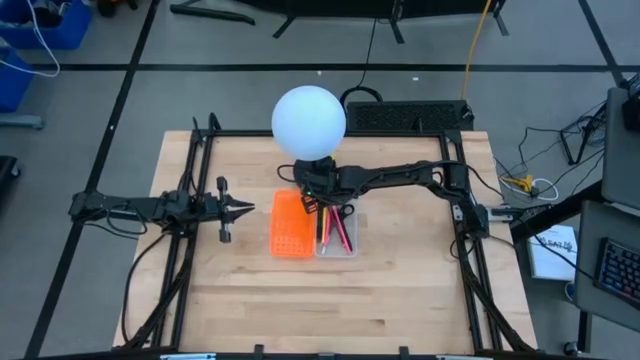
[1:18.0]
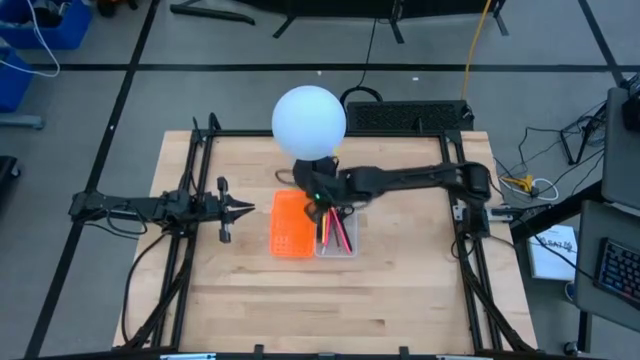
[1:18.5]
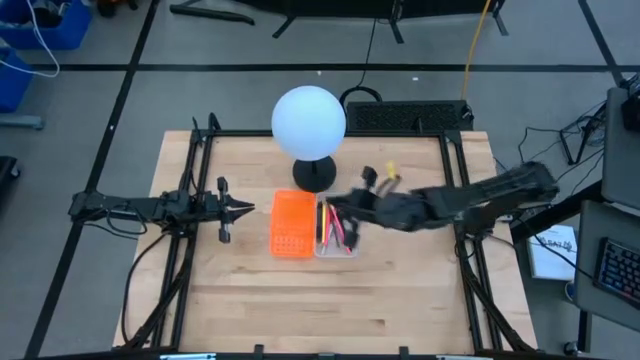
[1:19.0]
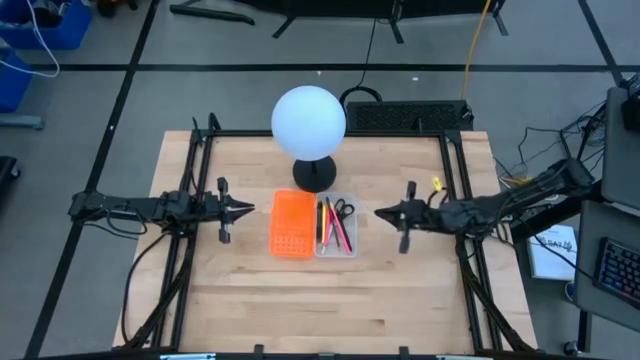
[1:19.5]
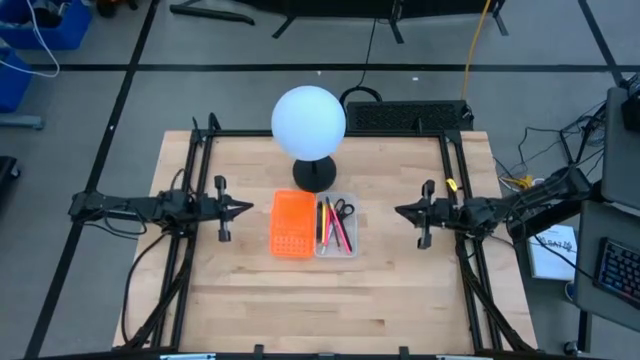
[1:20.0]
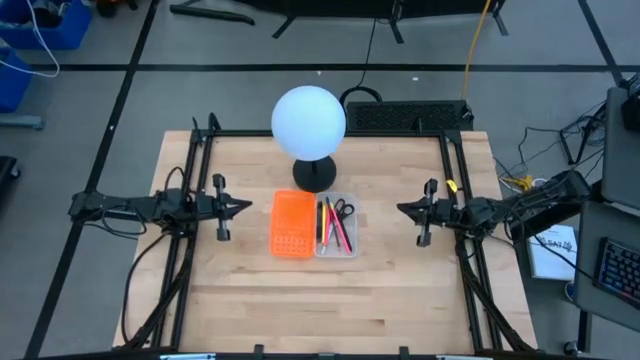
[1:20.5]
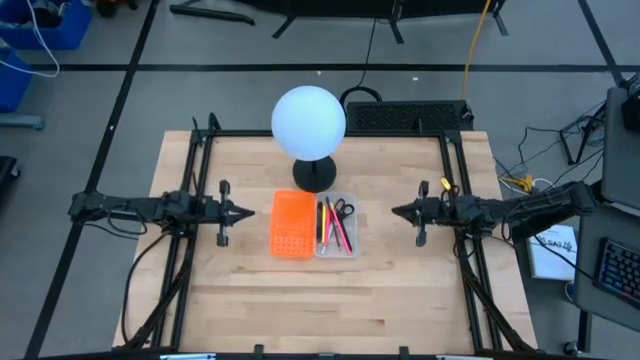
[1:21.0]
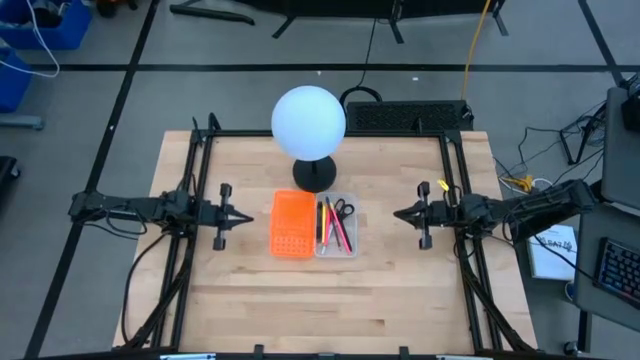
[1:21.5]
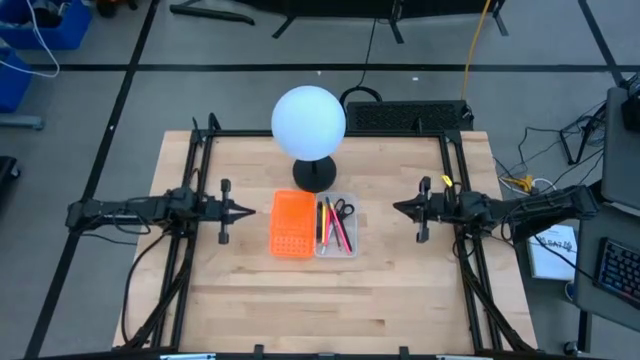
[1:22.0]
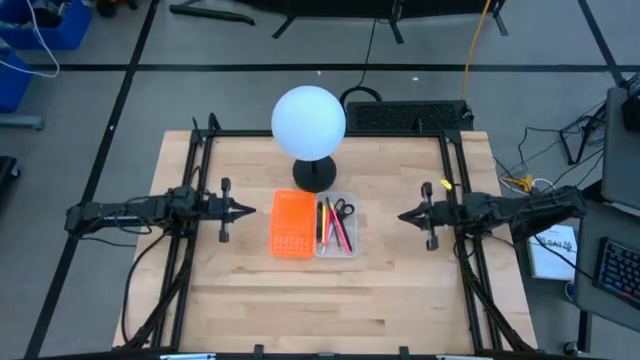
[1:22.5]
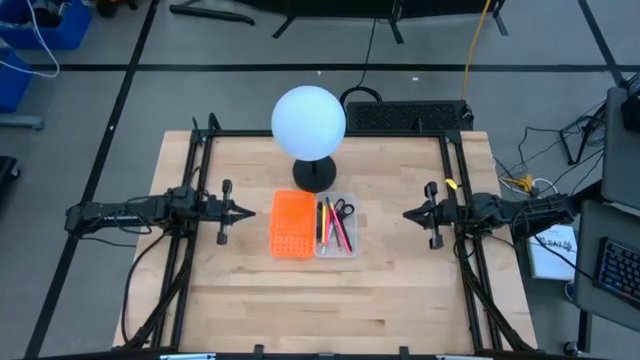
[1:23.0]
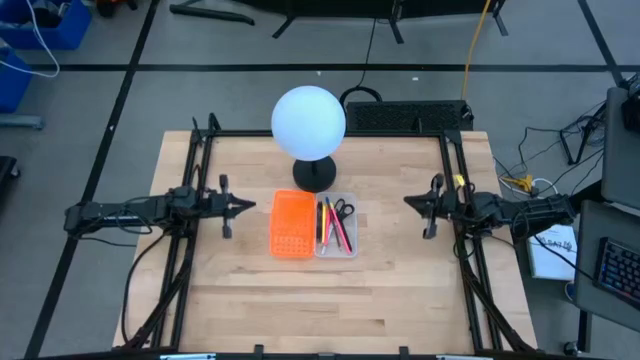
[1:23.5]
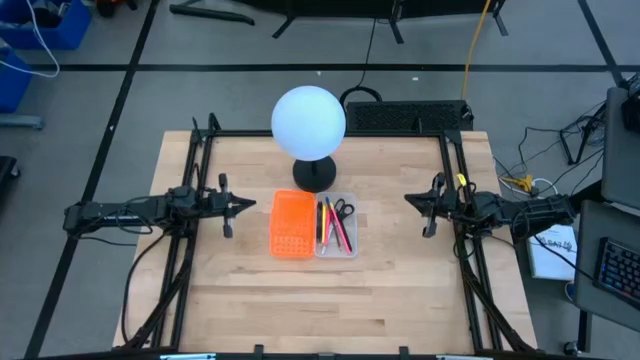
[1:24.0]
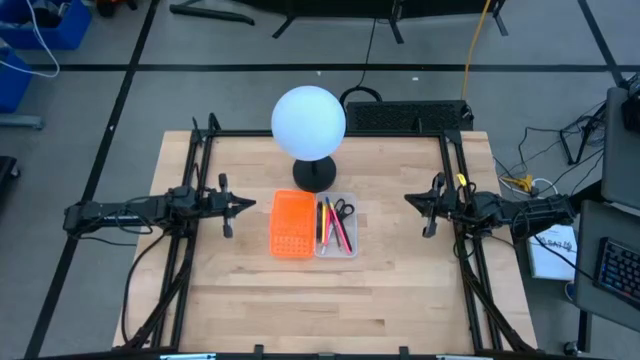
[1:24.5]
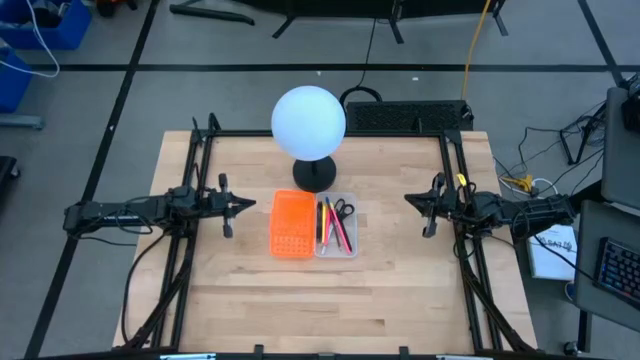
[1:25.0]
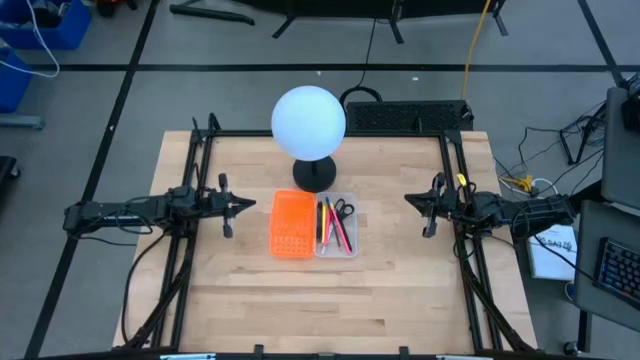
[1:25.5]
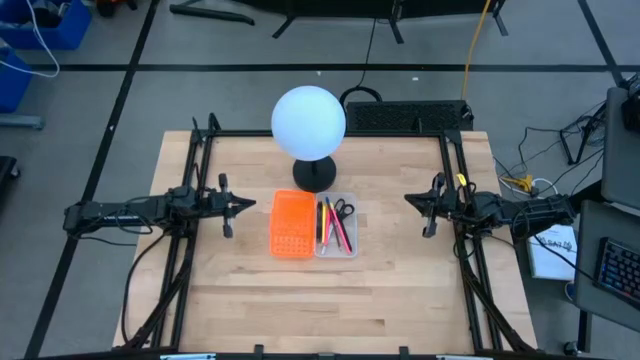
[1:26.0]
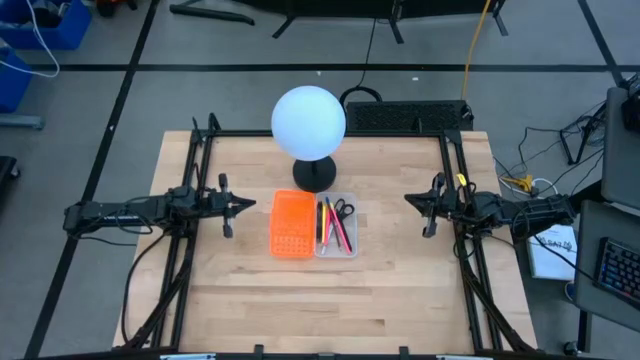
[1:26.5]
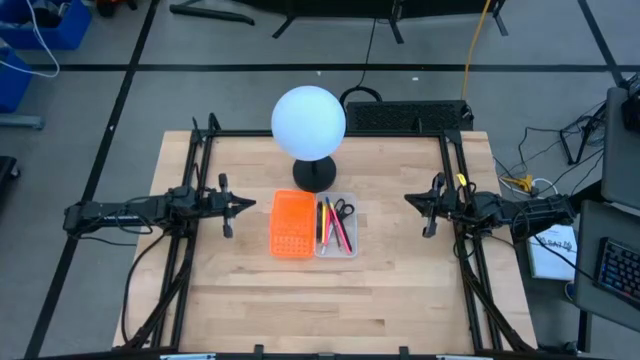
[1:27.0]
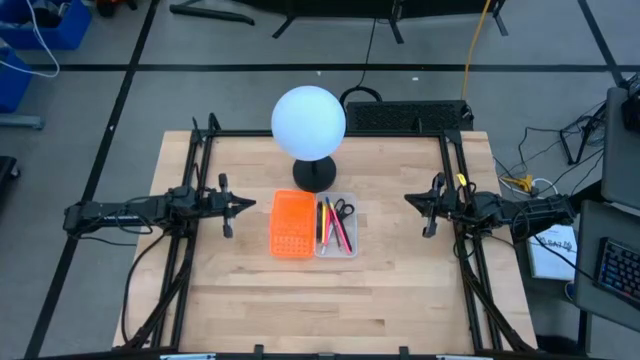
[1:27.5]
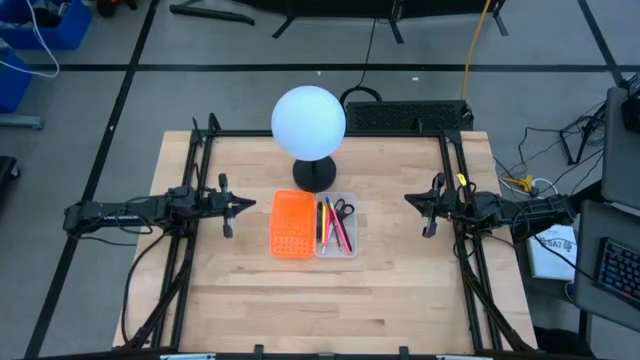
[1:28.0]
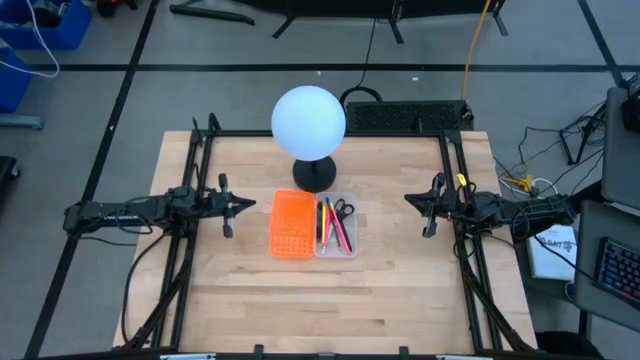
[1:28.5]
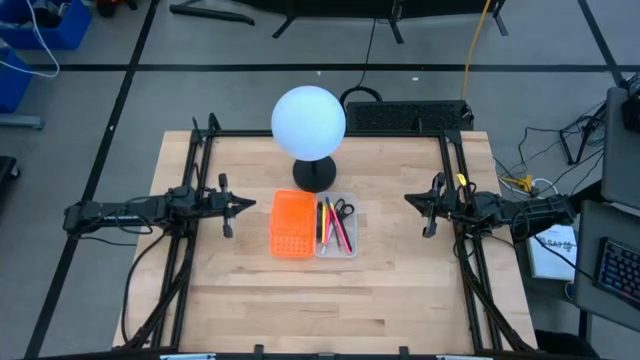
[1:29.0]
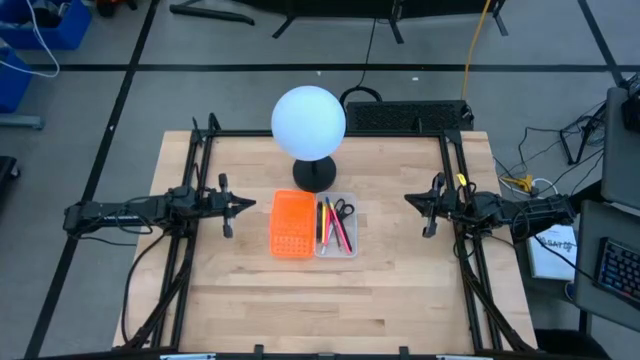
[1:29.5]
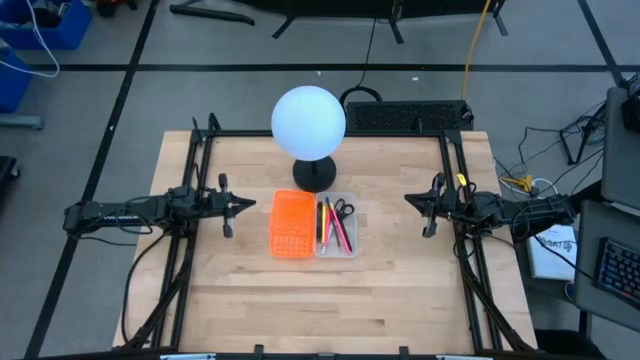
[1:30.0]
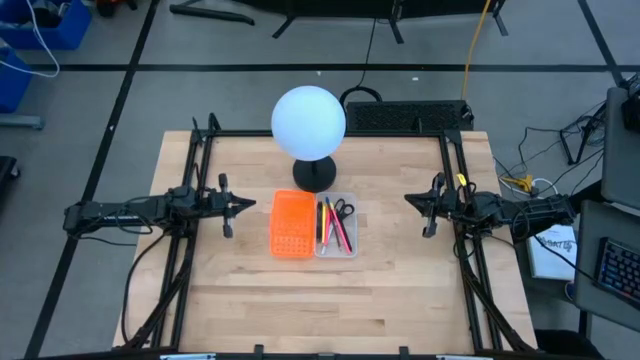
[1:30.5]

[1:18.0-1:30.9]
Task: Pick & place school supplies into a supply box
Return to Home Position

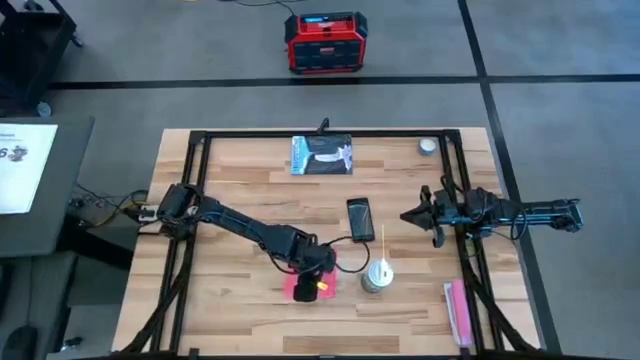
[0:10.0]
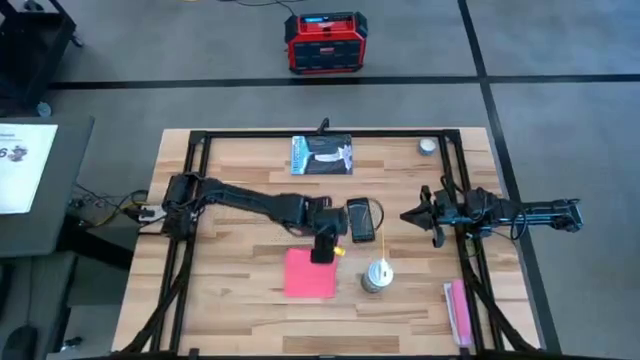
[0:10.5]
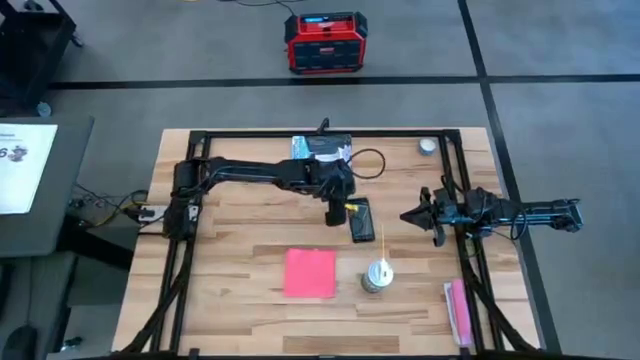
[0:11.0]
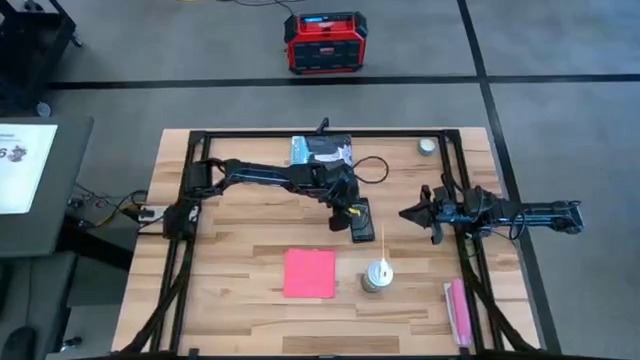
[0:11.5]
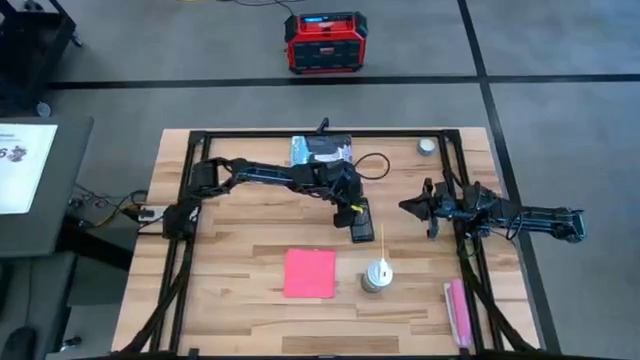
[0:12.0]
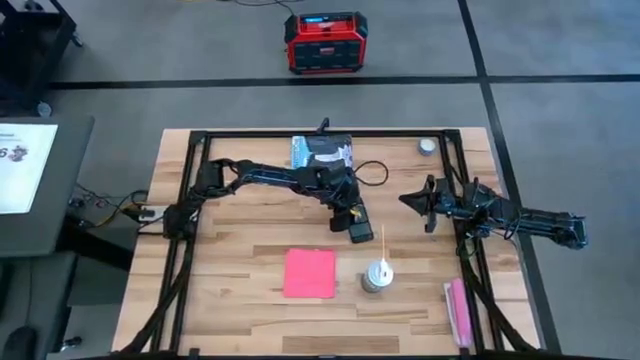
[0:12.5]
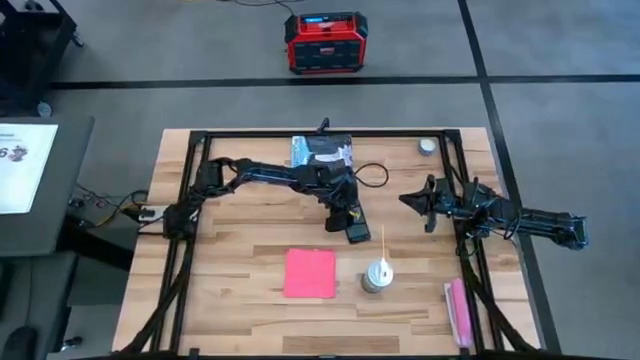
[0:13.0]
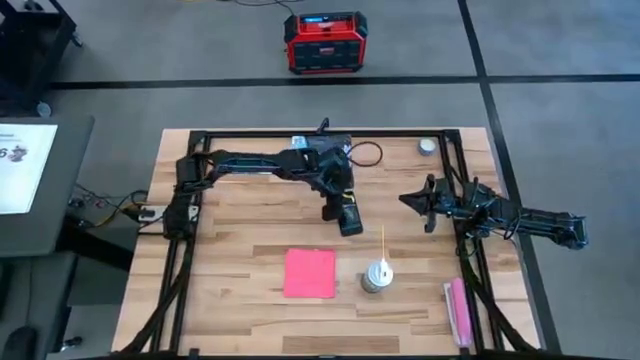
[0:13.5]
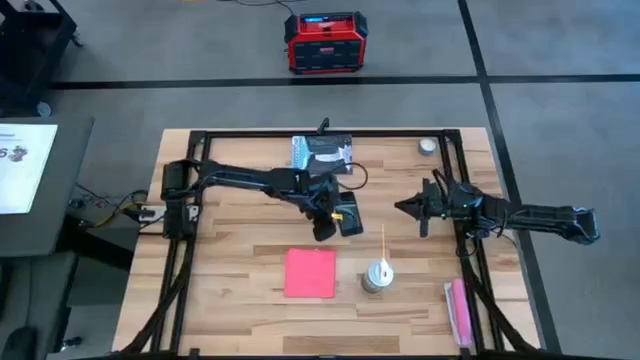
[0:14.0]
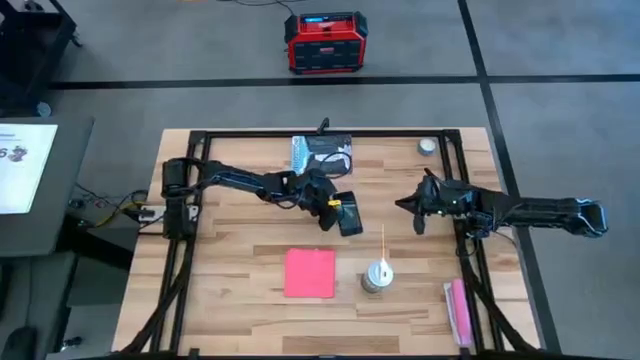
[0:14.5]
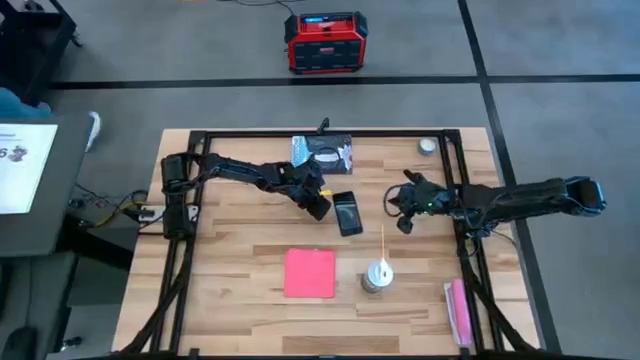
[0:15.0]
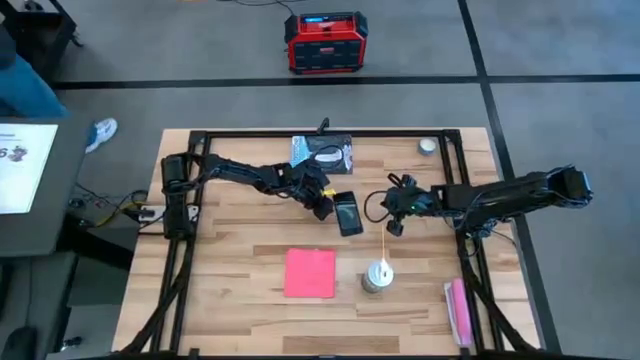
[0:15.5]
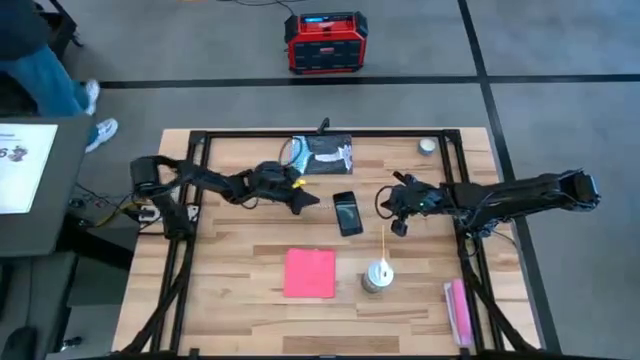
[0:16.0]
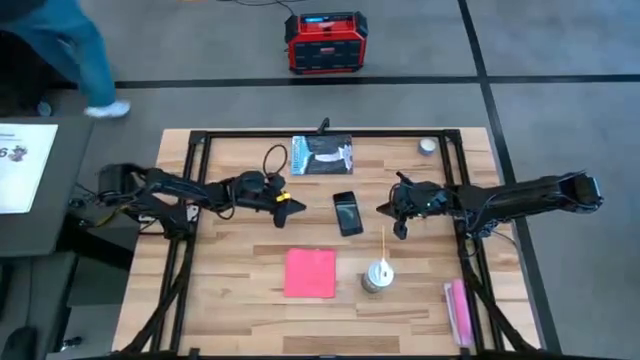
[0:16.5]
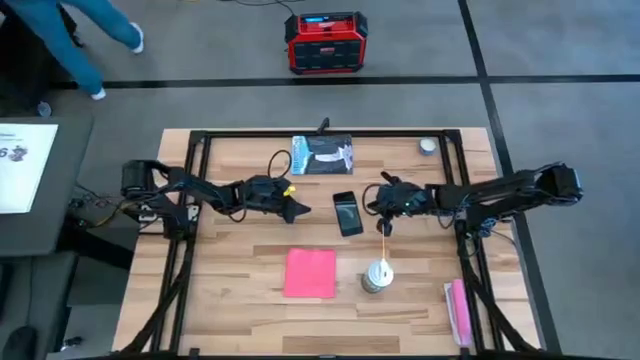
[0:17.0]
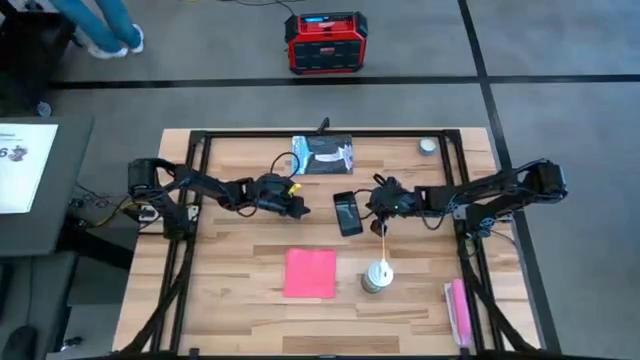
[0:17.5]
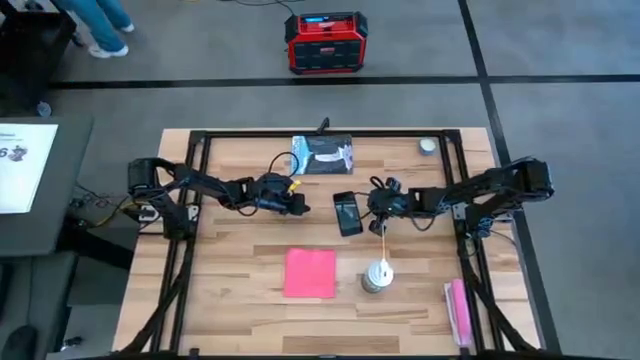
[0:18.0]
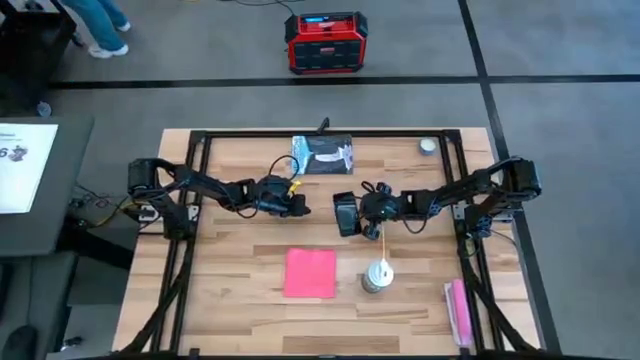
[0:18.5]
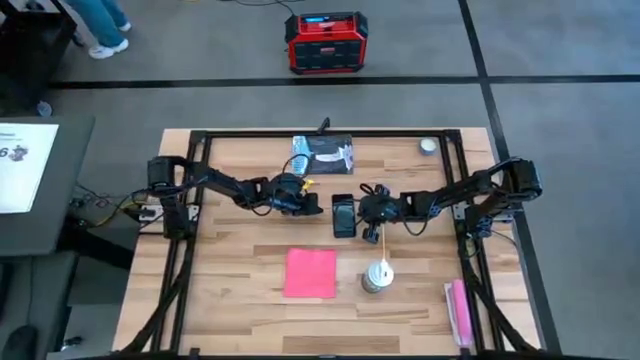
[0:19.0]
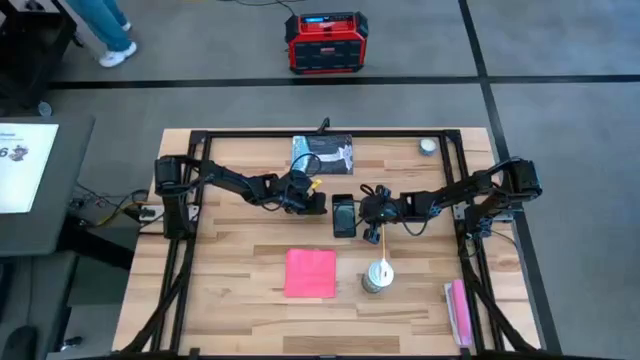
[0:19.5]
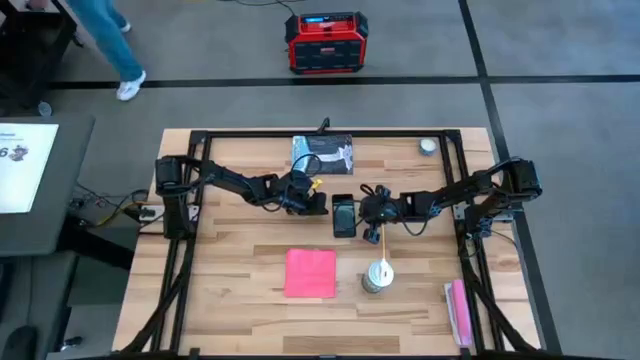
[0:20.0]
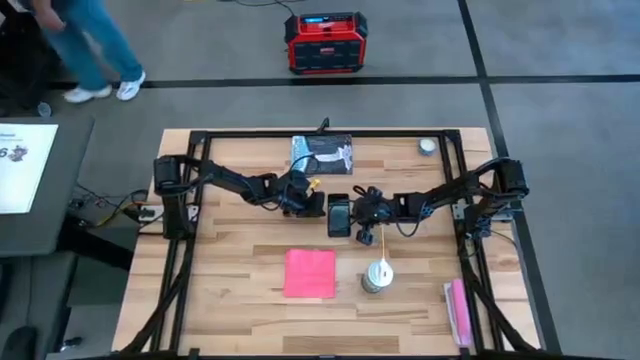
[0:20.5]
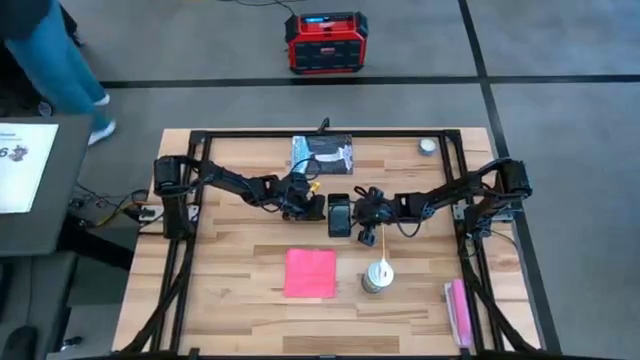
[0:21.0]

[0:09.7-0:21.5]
Task: Apply microfiber cloth
Spray the front of the cellphone using the spray bottle
